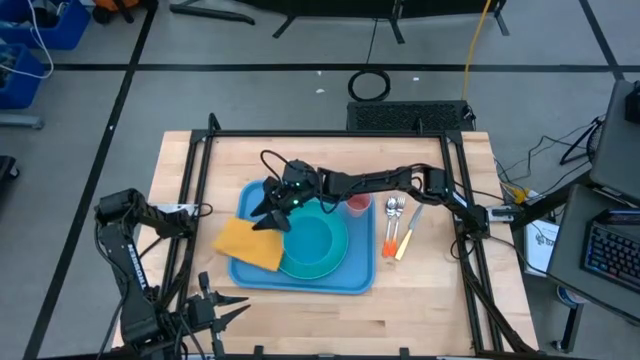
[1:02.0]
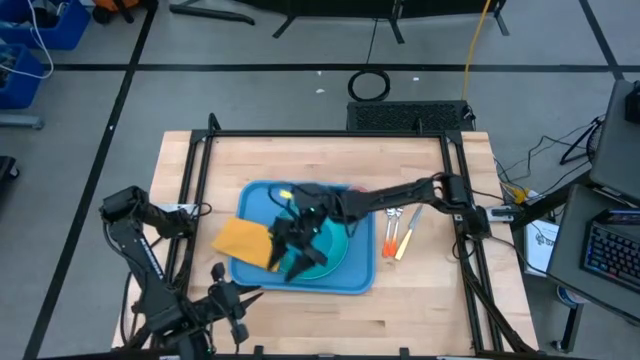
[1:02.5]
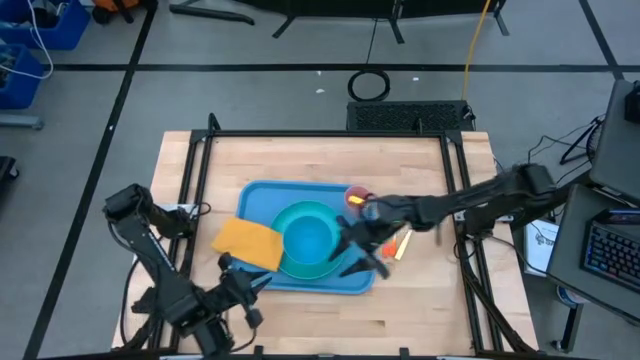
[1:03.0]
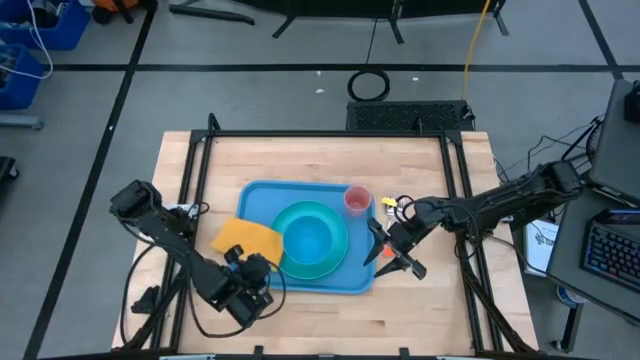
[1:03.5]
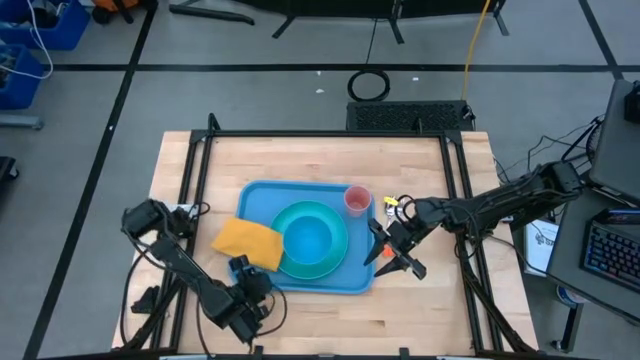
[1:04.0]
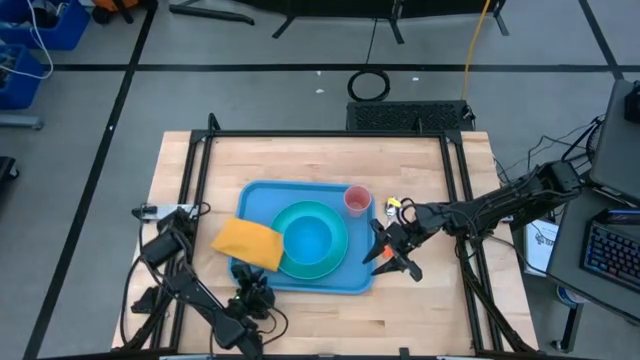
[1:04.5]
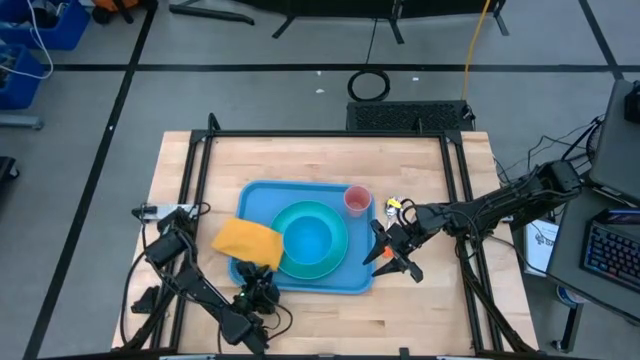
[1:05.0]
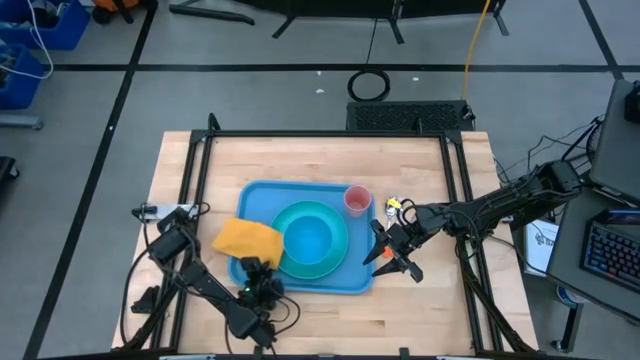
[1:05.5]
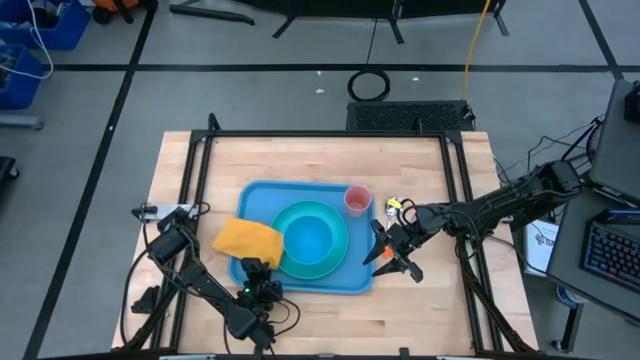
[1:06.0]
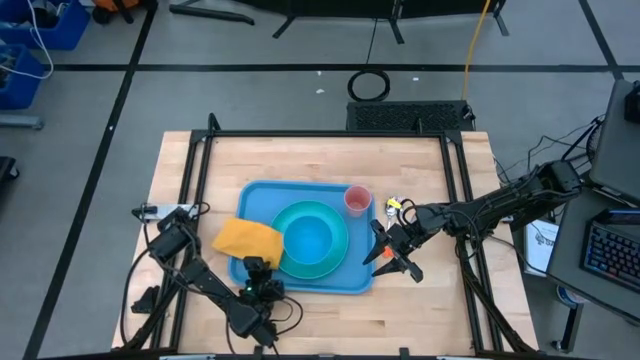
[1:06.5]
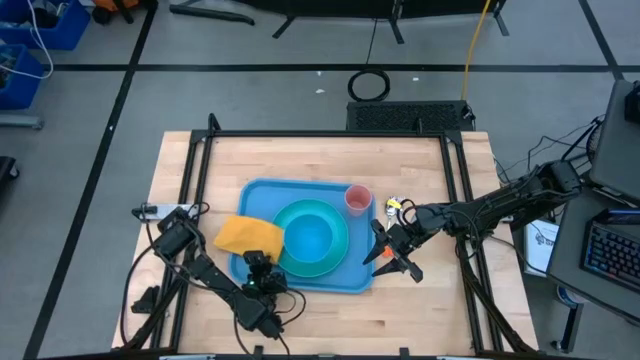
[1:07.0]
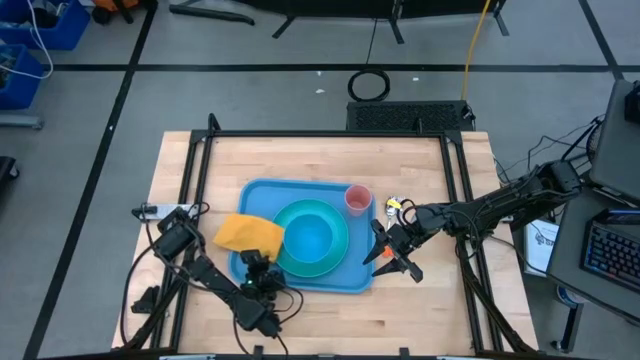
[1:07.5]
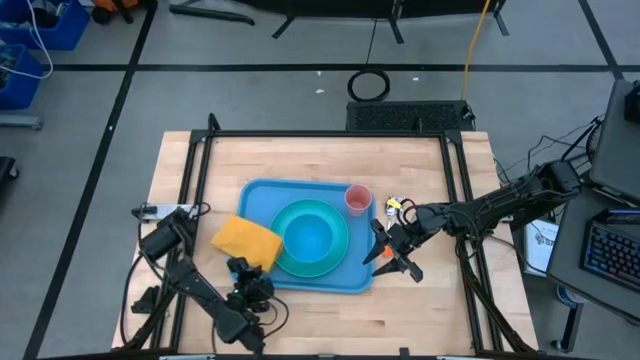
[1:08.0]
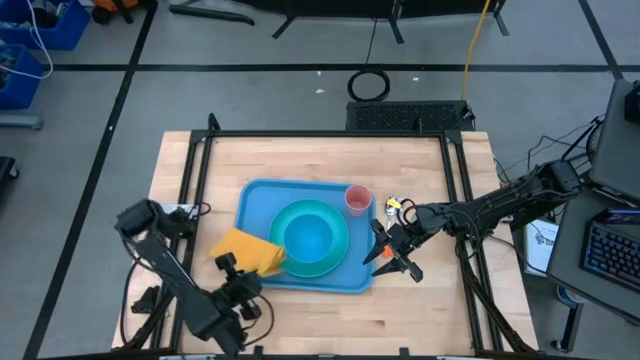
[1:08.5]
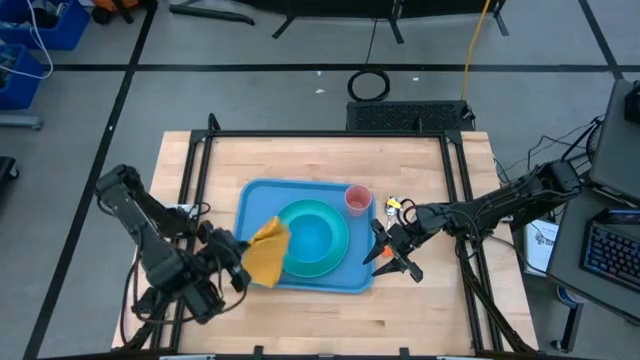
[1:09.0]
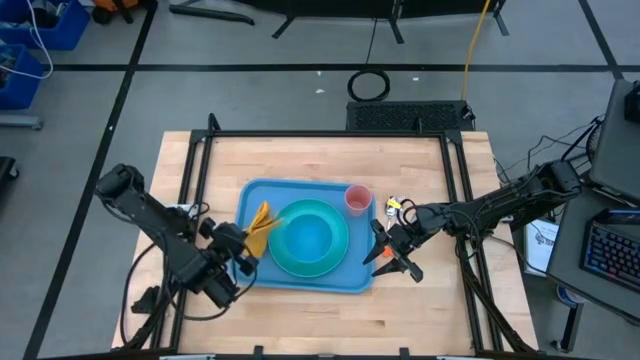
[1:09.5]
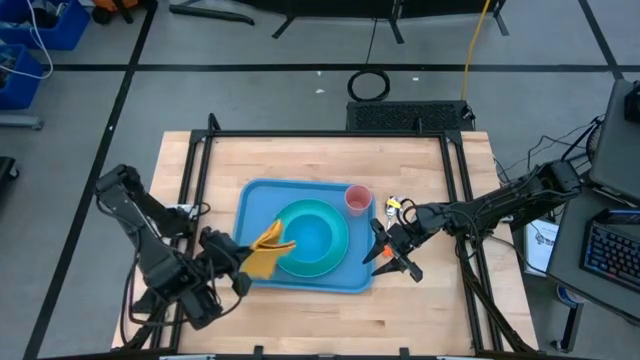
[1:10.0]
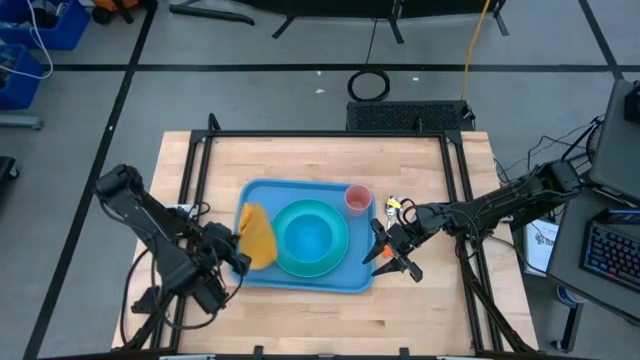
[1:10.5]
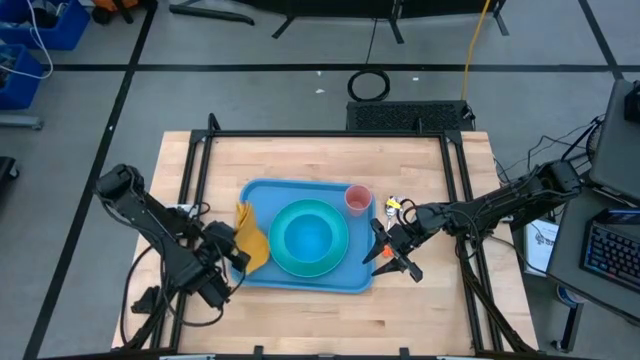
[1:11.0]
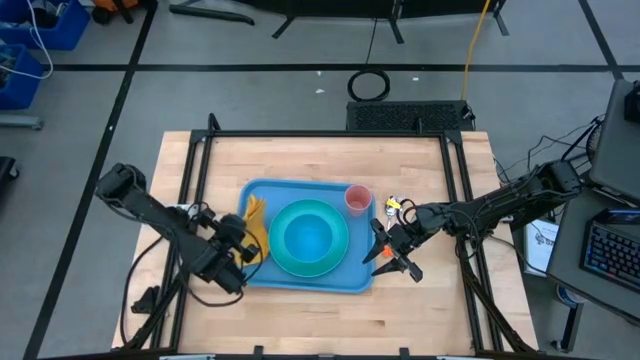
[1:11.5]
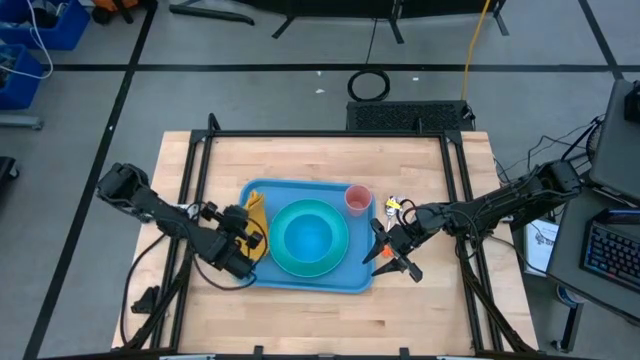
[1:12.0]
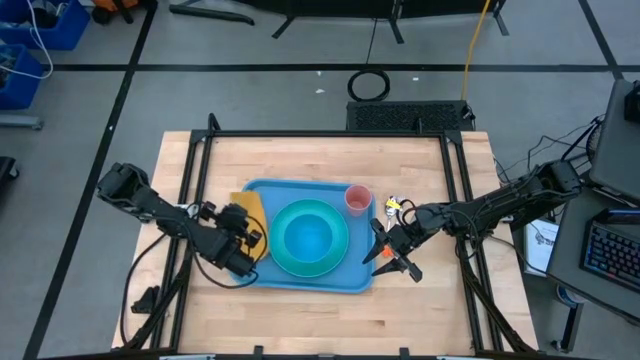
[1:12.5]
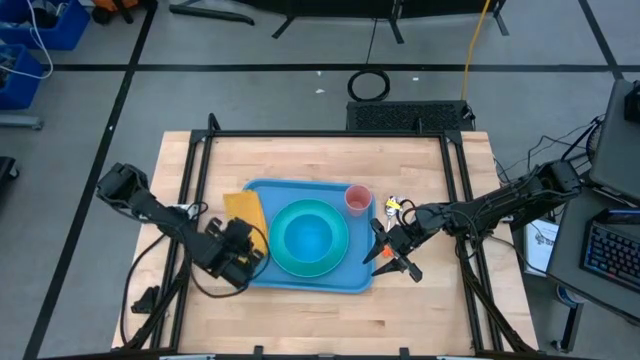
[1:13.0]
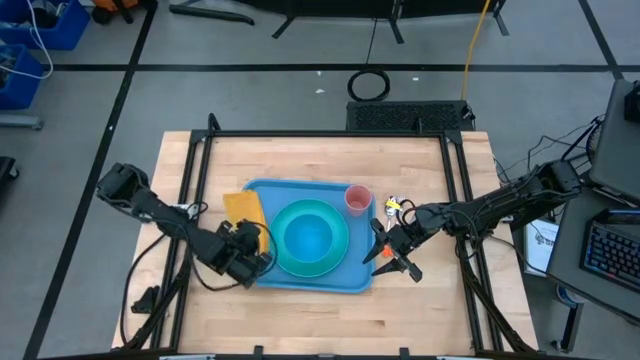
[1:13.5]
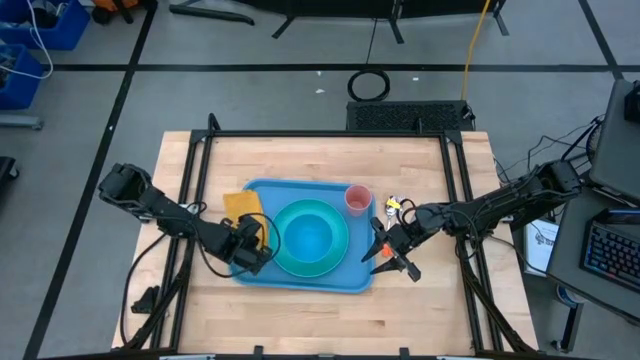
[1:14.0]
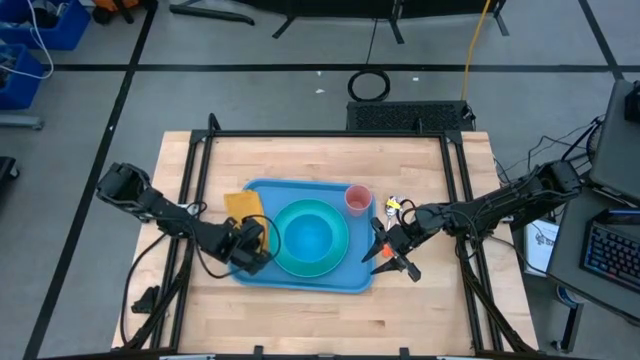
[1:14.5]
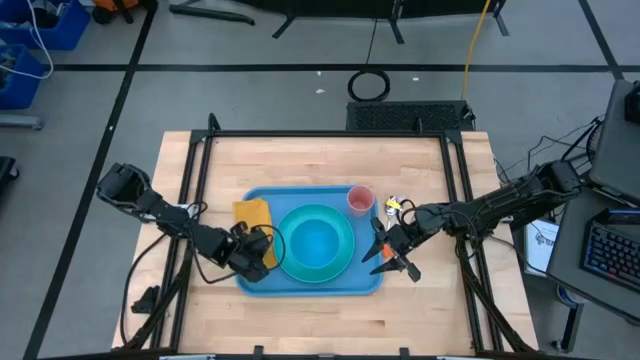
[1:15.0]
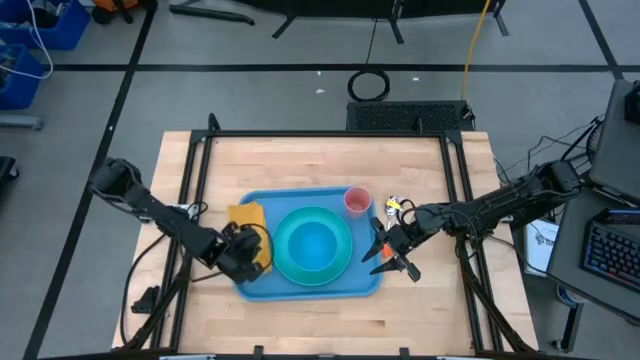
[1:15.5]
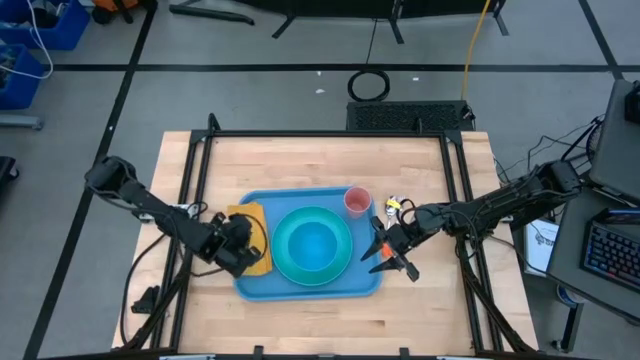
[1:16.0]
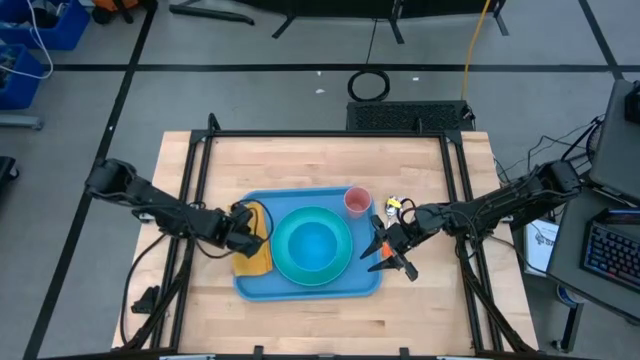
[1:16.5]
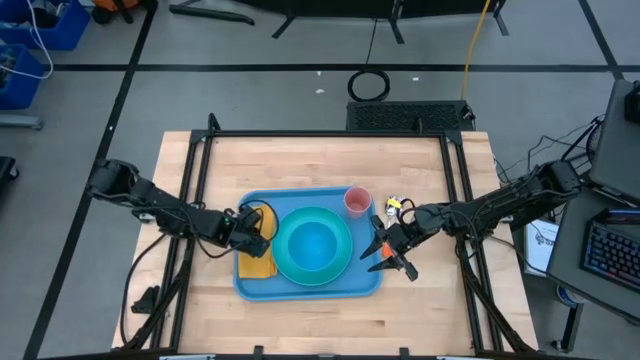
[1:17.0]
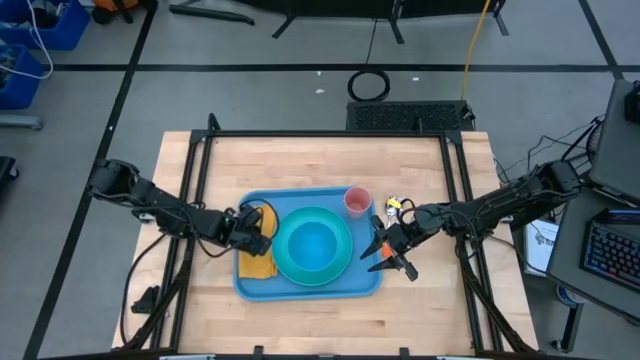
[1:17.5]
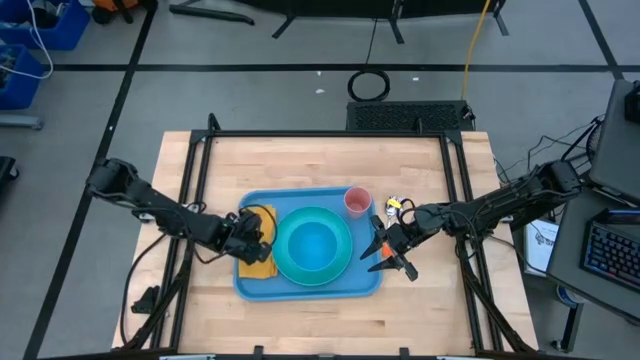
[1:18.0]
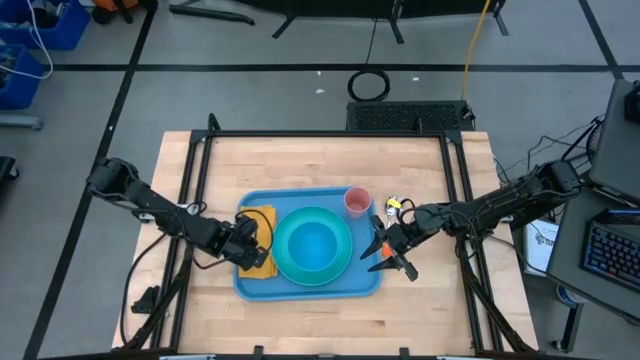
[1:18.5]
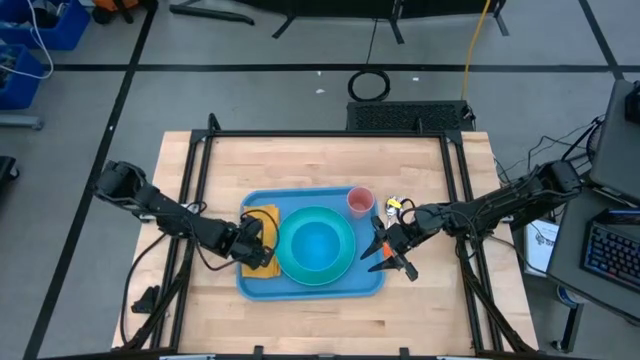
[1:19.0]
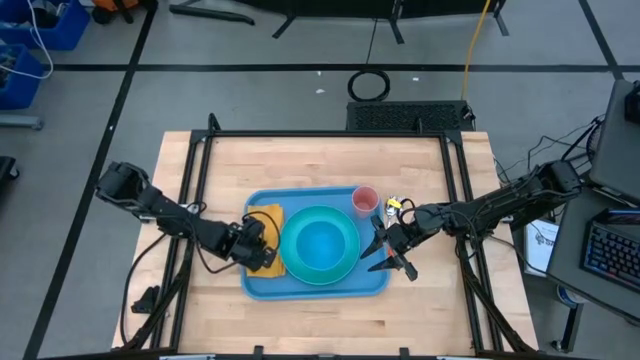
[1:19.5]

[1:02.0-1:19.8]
Task: Set up tray
Put the yellow napkin on the blue serving tray to the left of the green plate
